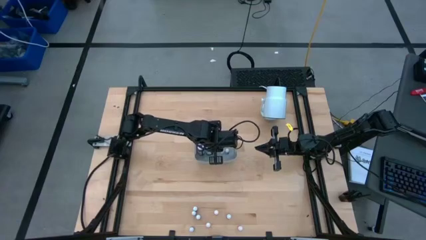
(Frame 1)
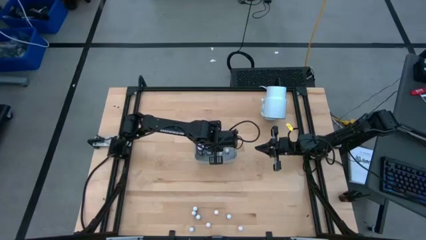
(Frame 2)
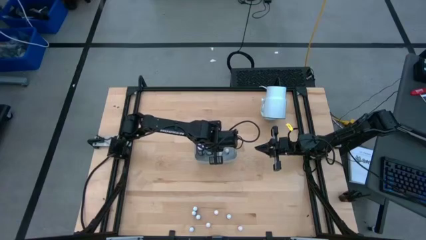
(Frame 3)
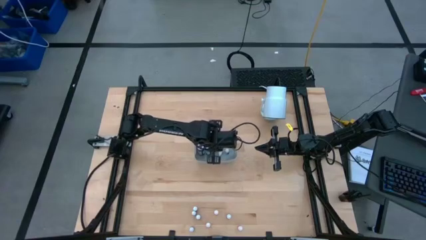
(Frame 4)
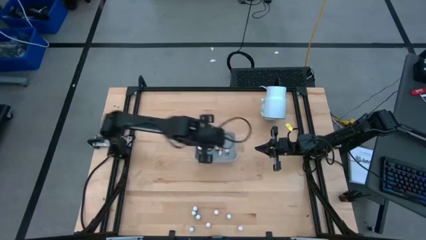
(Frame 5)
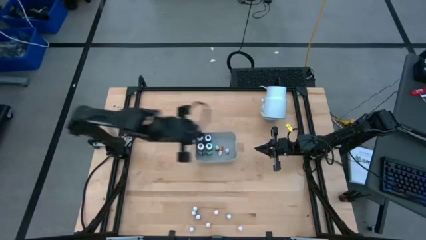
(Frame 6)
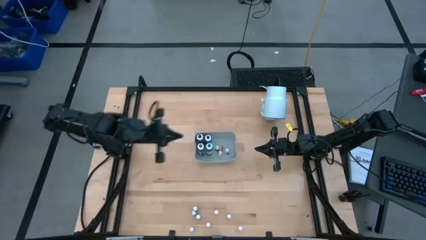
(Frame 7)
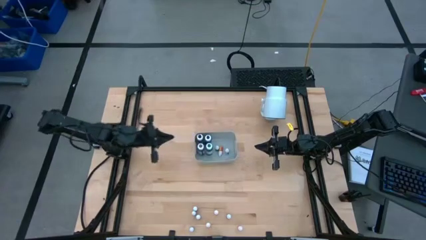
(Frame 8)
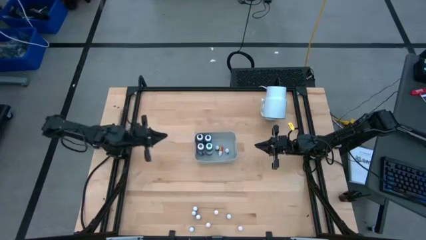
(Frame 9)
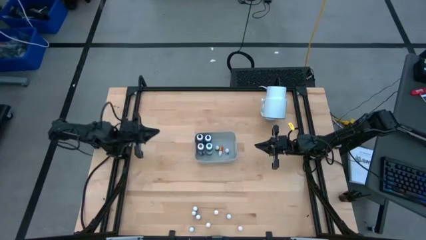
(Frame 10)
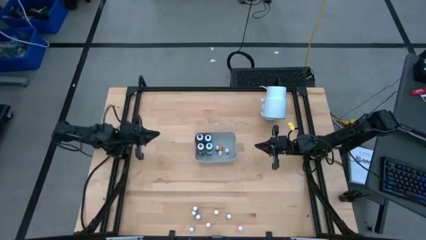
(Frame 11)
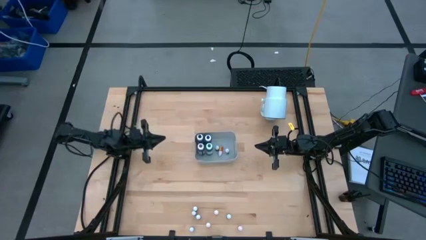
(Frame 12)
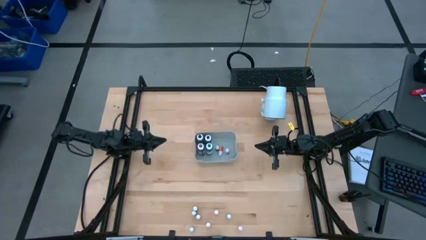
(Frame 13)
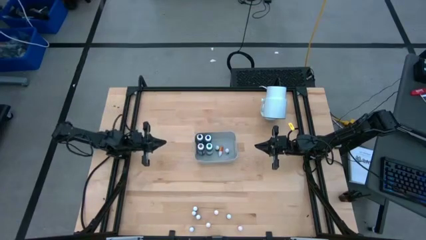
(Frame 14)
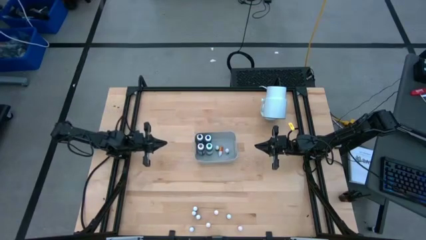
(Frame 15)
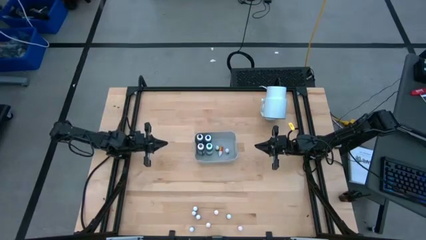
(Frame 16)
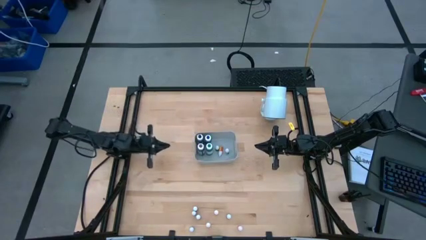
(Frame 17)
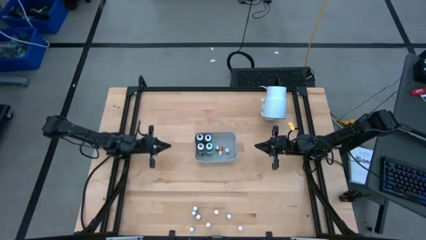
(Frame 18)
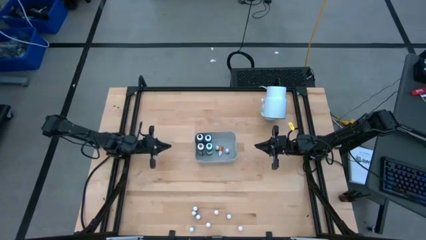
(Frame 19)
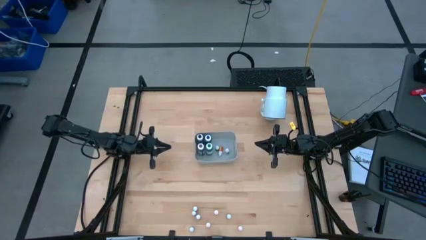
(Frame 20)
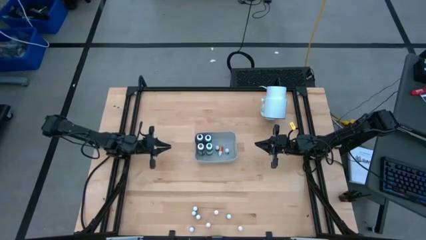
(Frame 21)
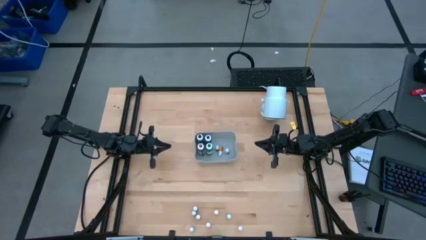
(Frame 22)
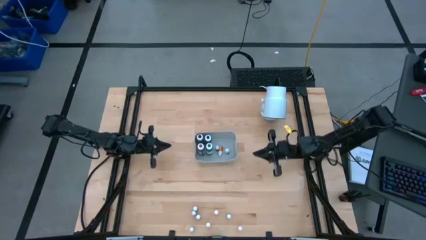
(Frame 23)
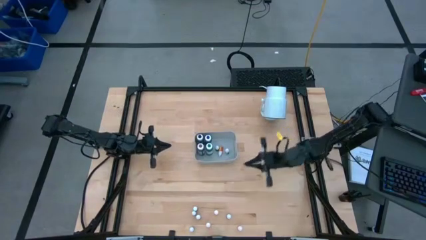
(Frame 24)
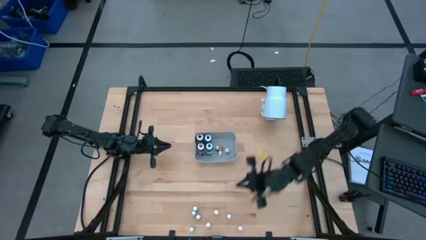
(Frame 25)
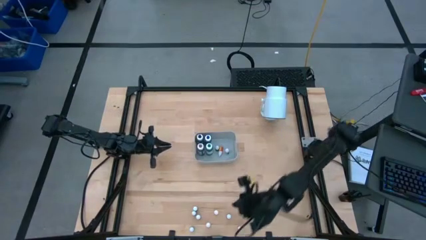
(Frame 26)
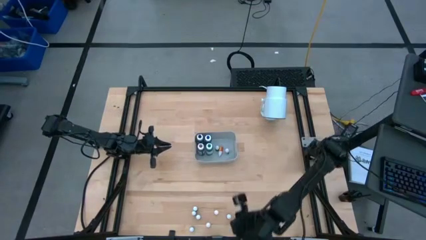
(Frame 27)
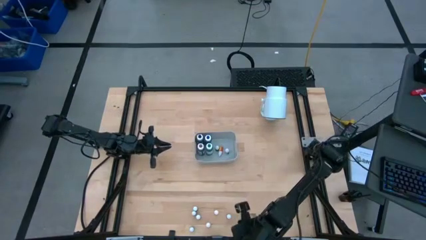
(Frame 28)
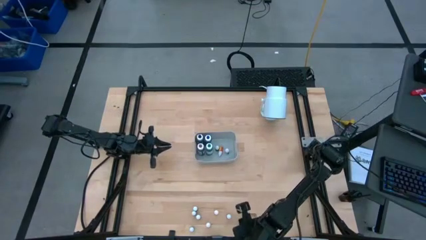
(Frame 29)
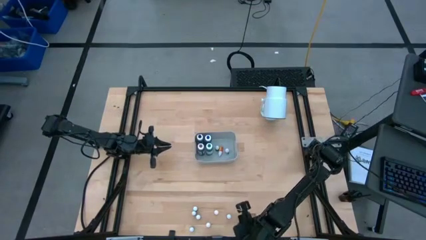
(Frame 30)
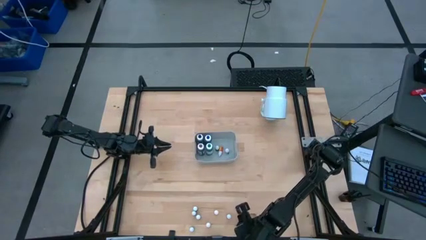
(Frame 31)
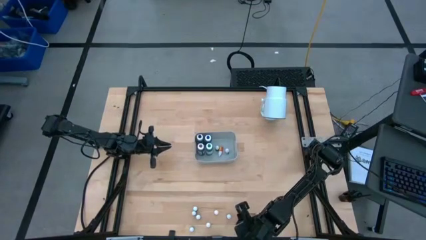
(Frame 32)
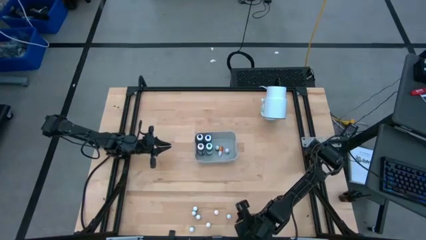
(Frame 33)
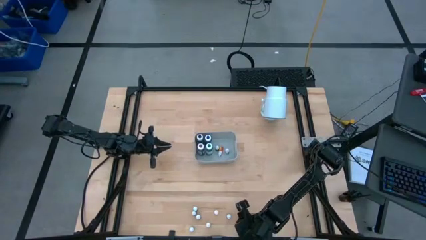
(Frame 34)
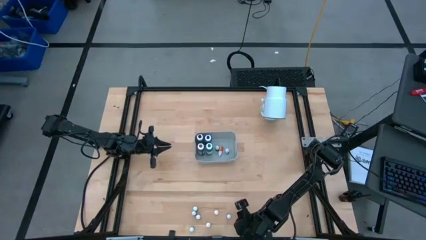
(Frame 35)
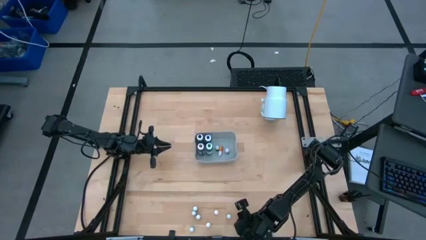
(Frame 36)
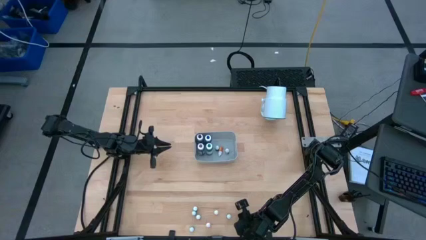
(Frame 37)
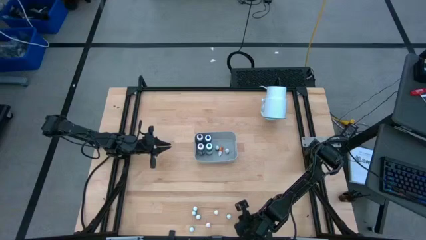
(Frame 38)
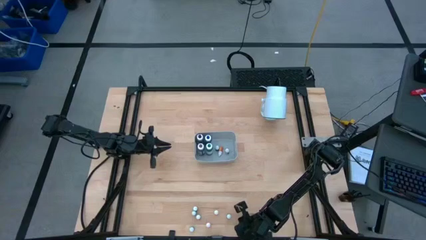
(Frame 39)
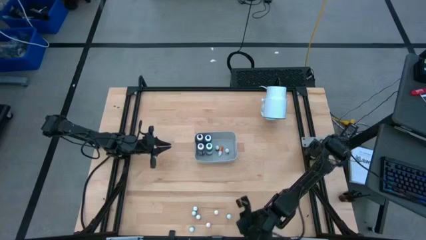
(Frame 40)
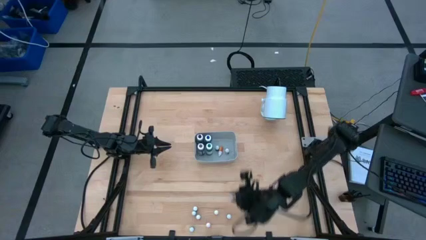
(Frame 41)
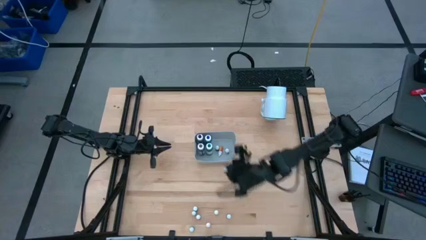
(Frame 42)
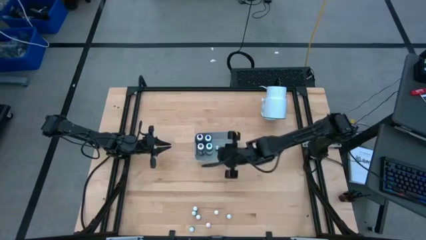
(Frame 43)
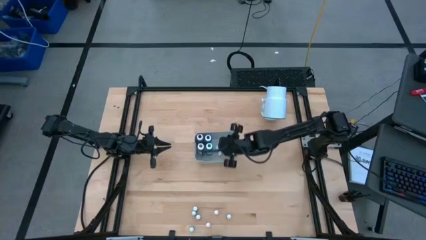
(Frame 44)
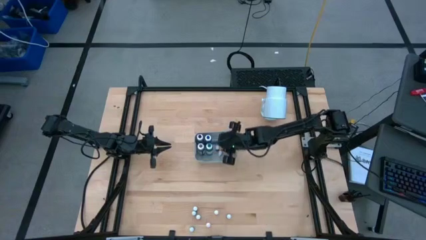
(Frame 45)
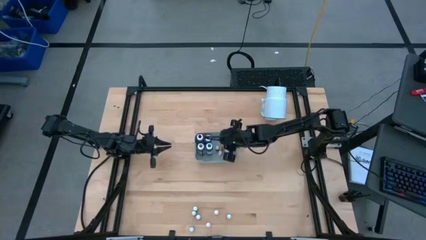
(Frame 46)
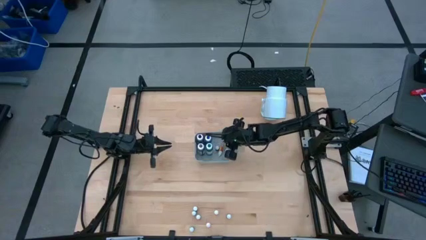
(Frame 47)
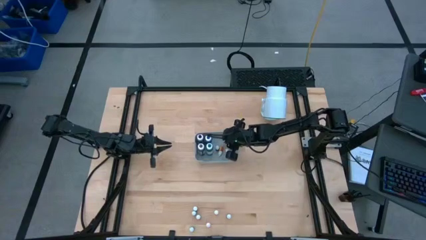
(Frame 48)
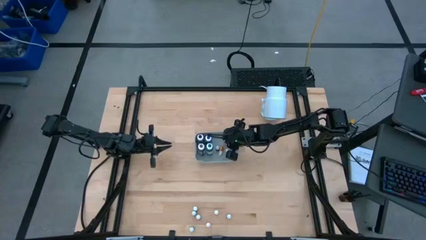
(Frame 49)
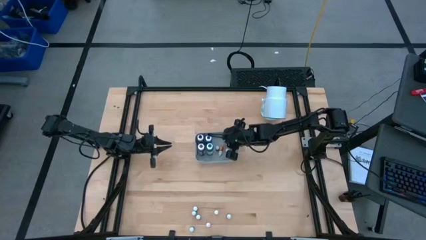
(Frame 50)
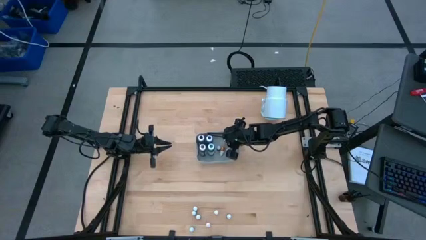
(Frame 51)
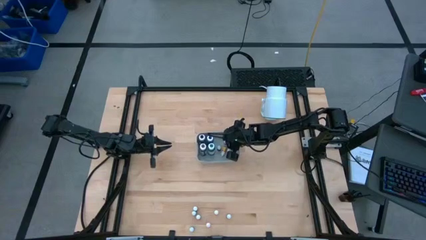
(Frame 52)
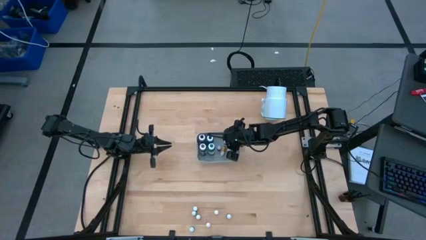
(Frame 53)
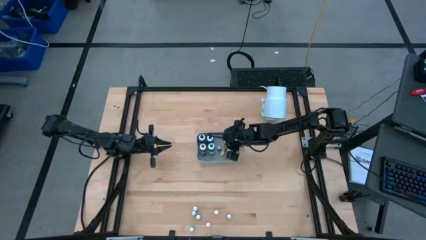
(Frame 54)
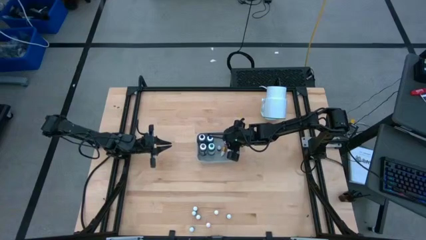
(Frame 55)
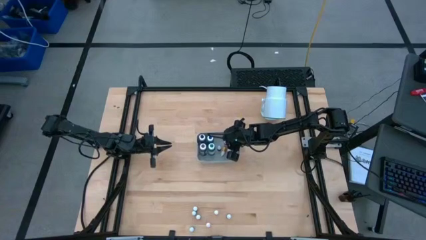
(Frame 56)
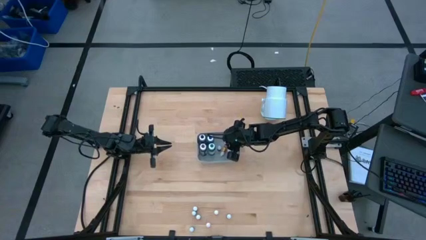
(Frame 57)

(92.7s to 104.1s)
Task: Pick & Place food coloring
Put the small yellow food coloring bottle into the white bin

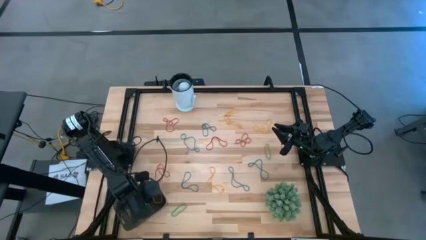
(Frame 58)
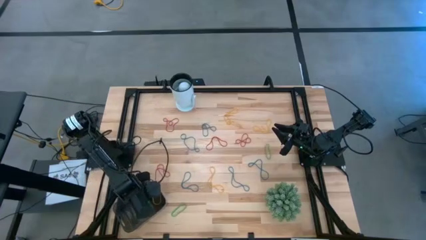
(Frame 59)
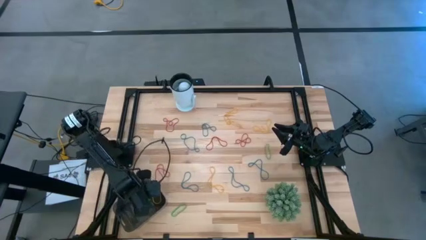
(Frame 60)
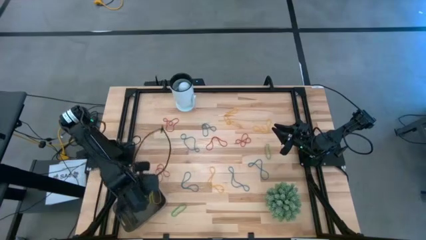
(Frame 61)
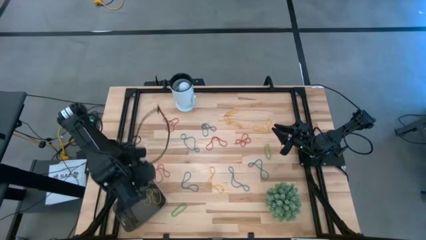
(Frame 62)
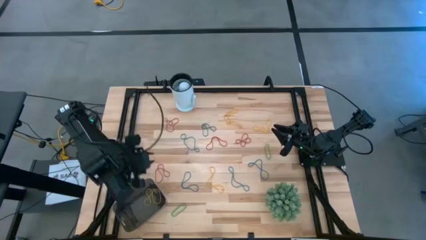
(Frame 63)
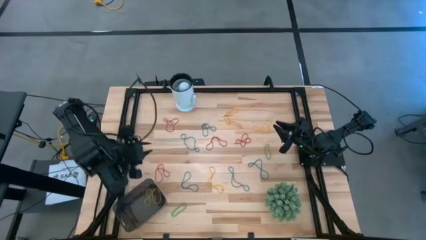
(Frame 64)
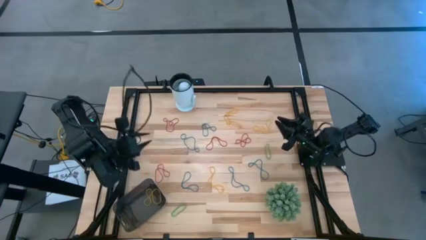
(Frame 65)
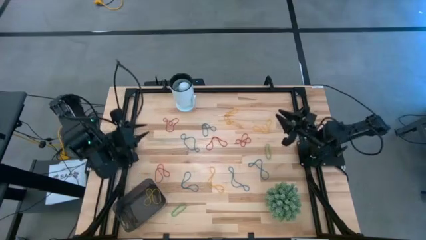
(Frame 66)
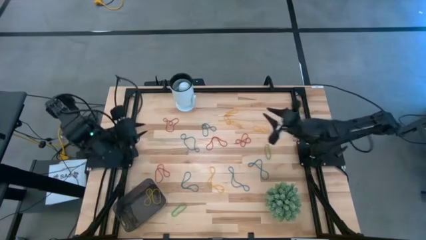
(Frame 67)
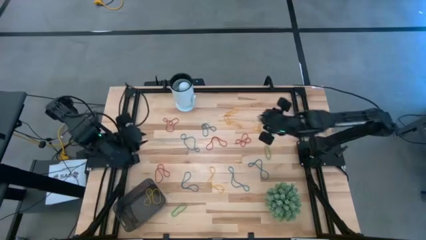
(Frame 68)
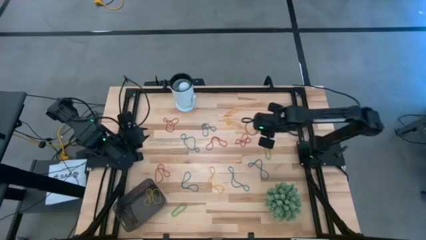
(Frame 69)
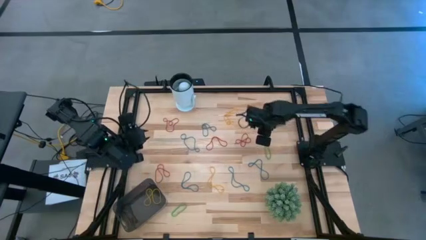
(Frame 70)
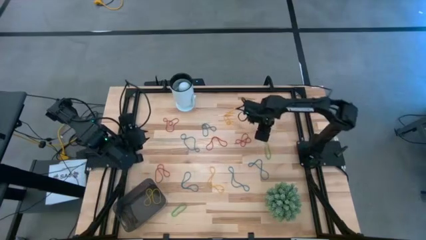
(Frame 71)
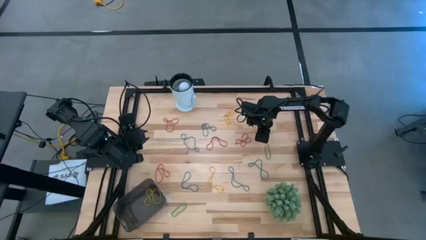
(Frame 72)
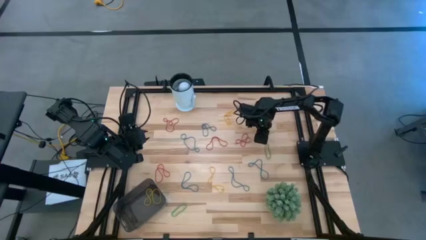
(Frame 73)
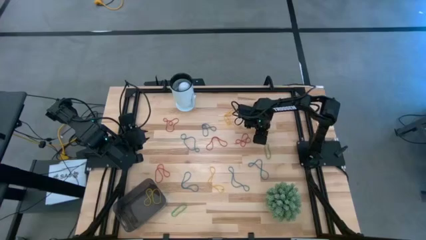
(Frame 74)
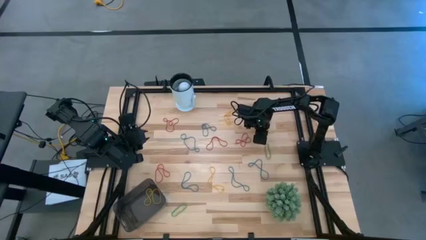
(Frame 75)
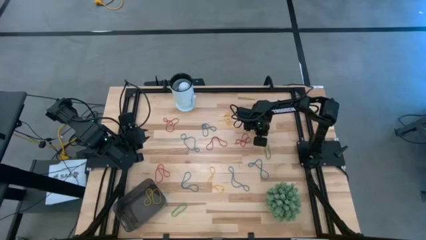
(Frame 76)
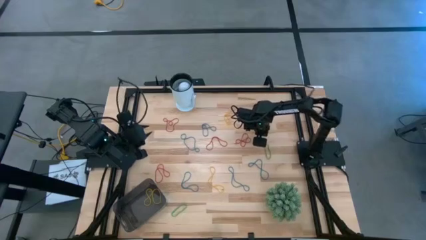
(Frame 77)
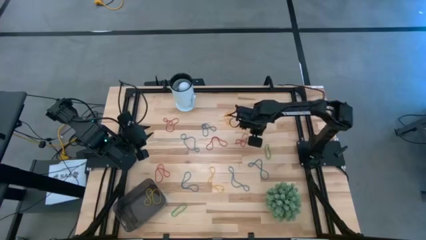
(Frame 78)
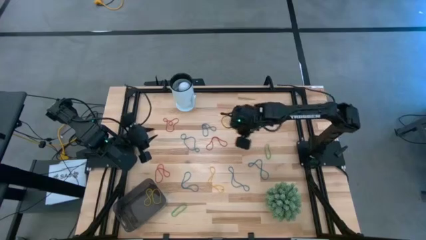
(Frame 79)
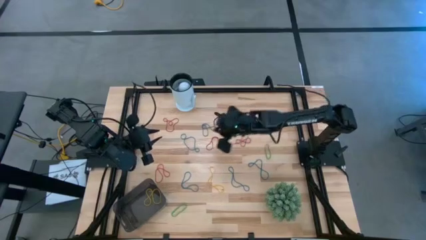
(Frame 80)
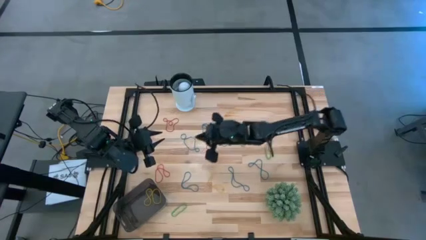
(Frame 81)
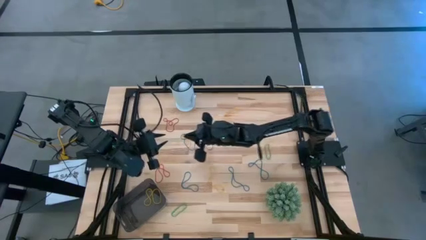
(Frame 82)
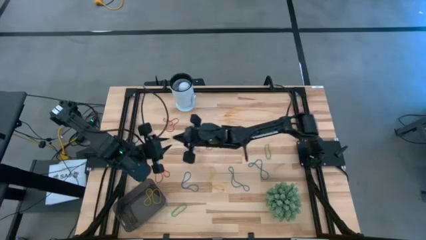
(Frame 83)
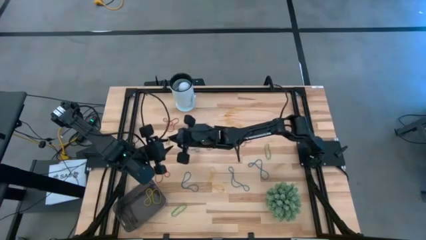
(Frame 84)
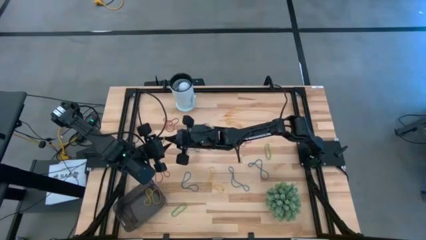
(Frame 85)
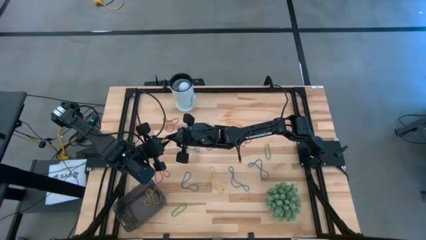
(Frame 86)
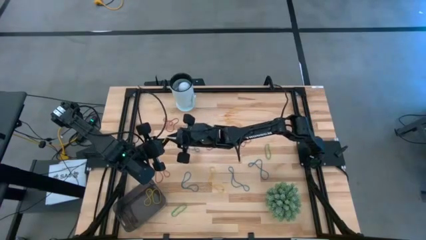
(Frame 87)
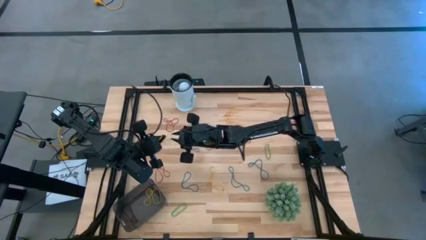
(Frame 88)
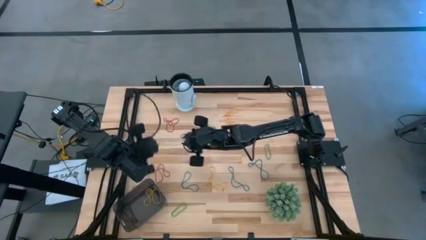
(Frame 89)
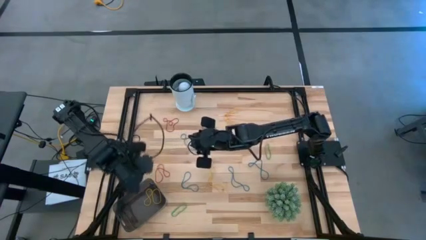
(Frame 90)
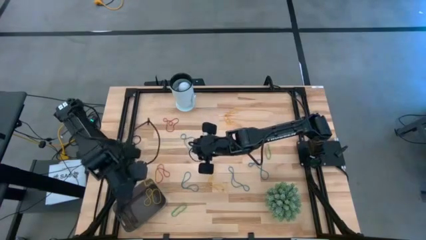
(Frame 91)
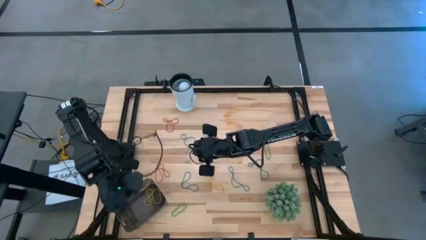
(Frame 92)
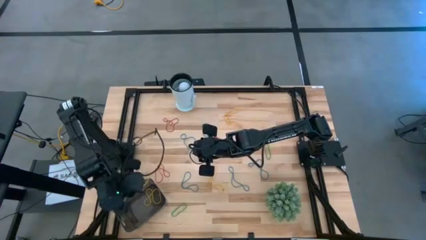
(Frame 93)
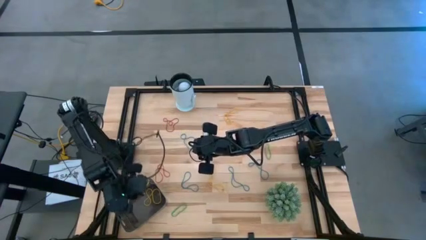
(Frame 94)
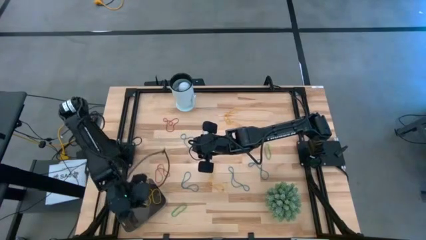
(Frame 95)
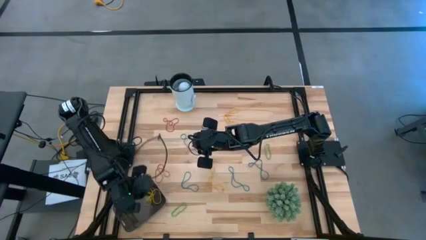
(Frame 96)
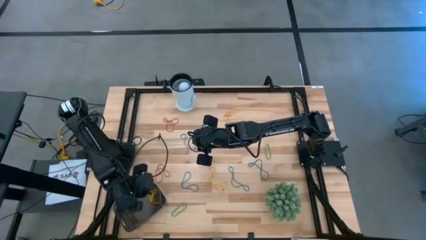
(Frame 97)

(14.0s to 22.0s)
Task: Pick and place items into bin
Put the yellow rubber band into the black bin
